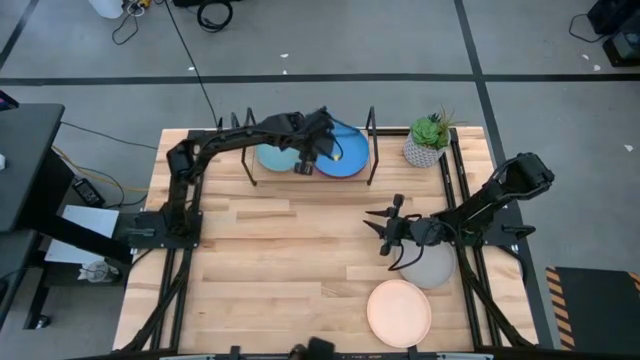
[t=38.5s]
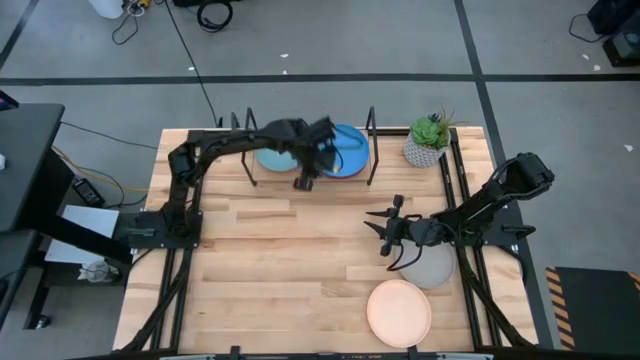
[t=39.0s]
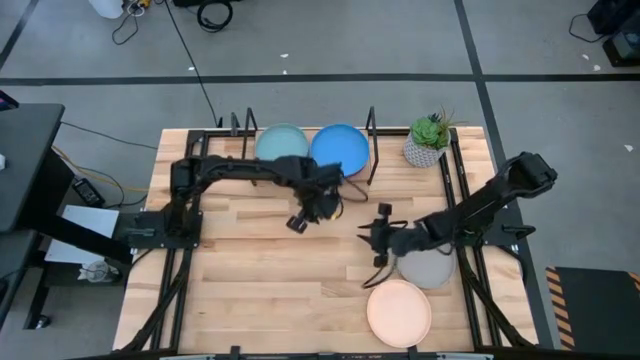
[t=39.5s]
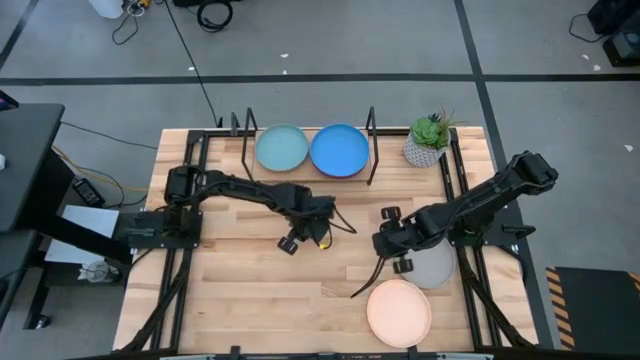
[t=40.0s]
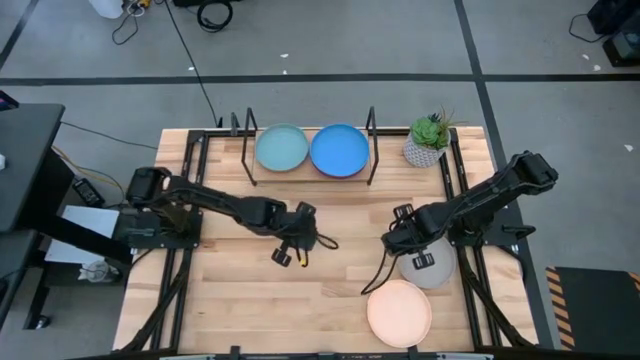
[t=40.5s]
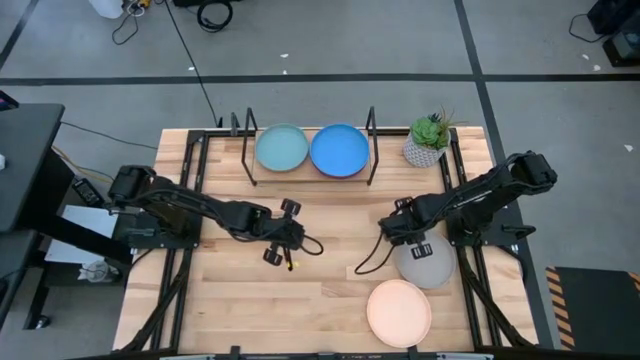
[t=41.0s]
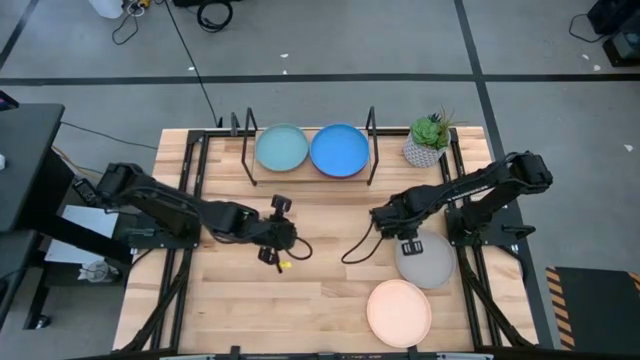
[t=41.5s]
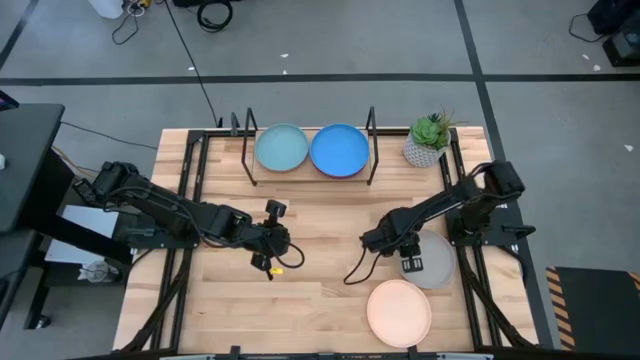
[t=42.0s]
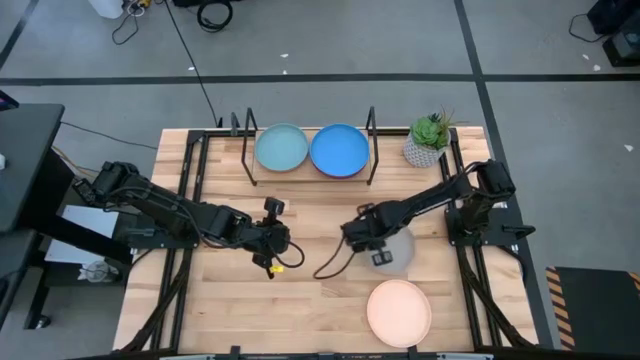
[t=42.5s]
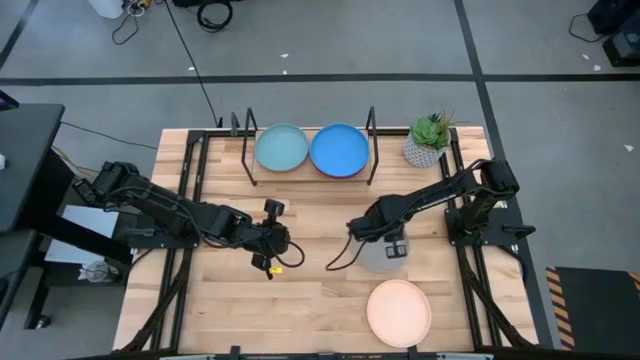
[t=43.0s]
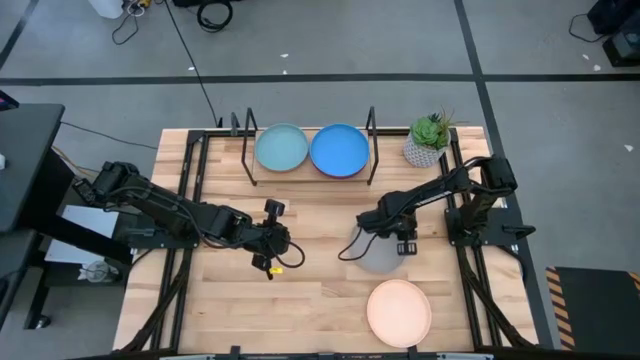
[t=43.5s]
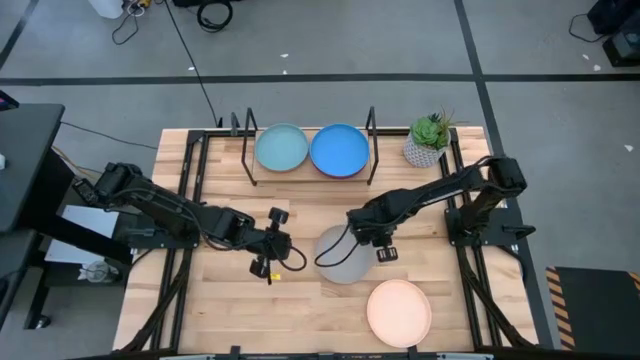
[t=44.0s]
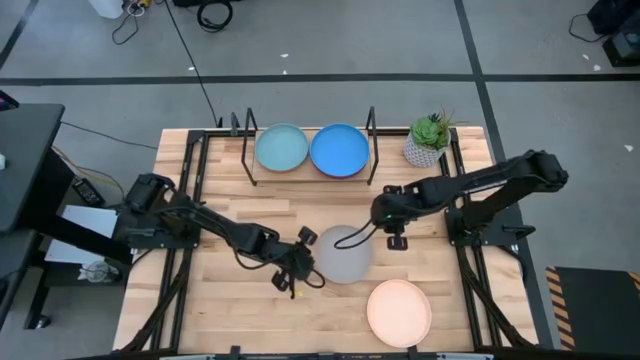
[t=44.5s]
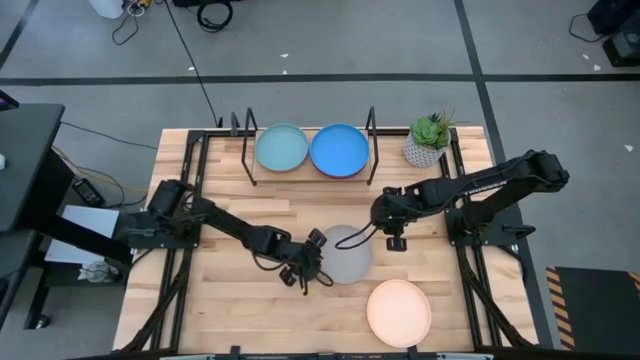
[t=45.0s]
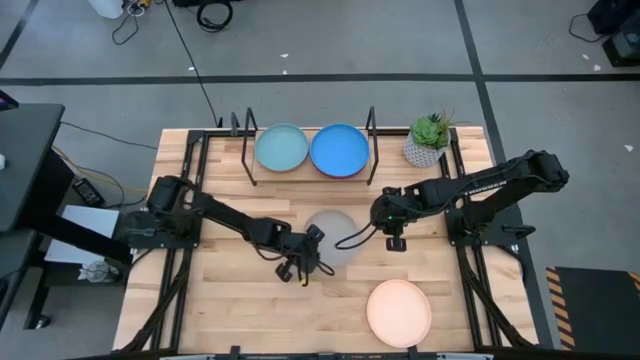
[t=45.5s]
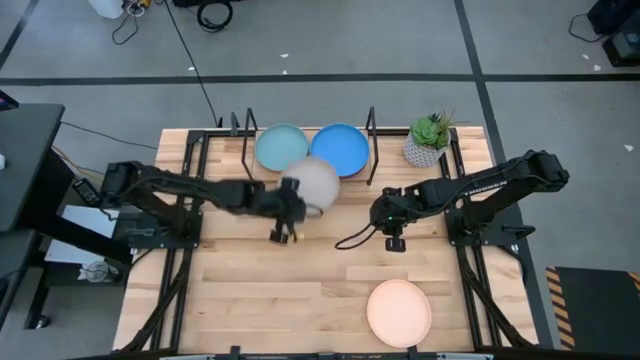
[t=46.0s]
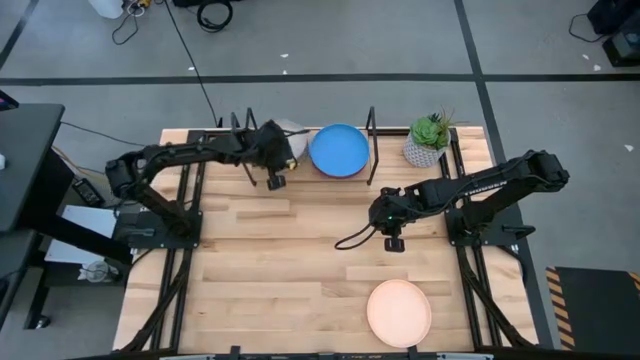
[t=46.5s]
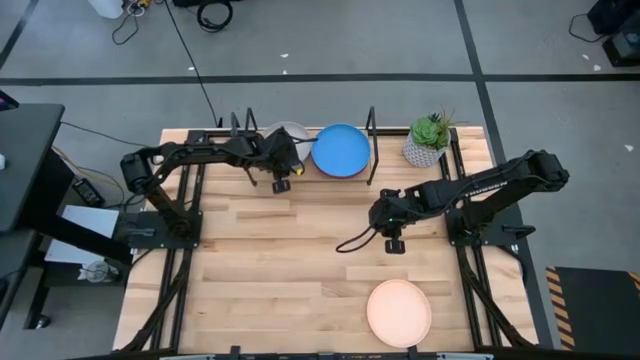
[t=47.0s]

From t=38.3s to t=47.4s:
Task: Place and stack plates onto a shelf
Stack the gray plate on top of the light blue plate on the shelf

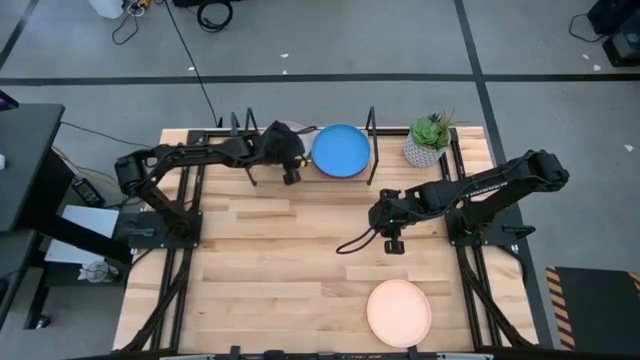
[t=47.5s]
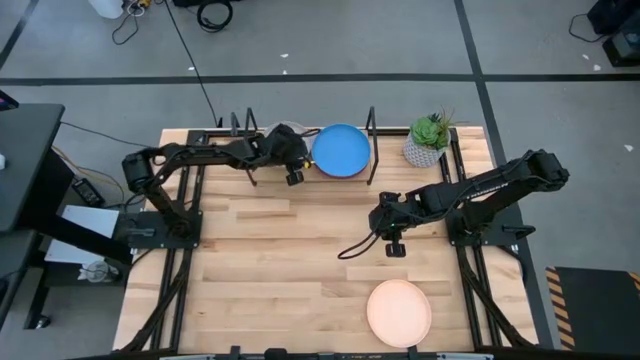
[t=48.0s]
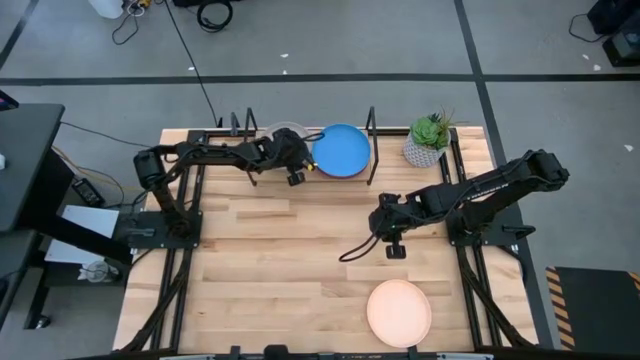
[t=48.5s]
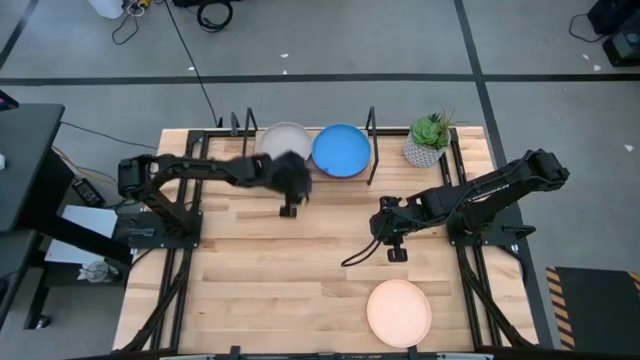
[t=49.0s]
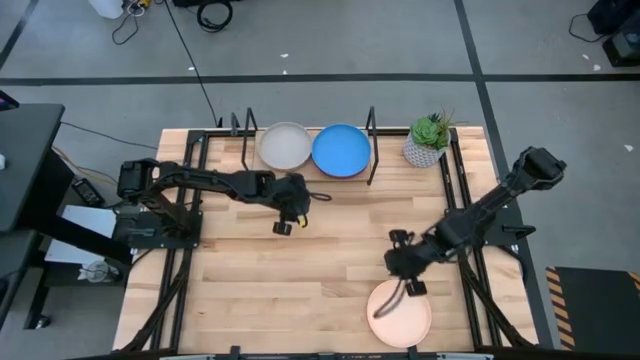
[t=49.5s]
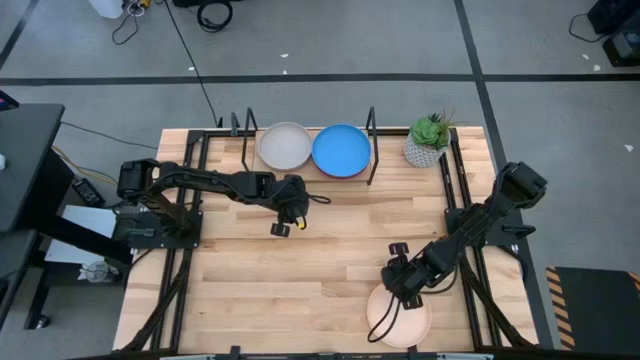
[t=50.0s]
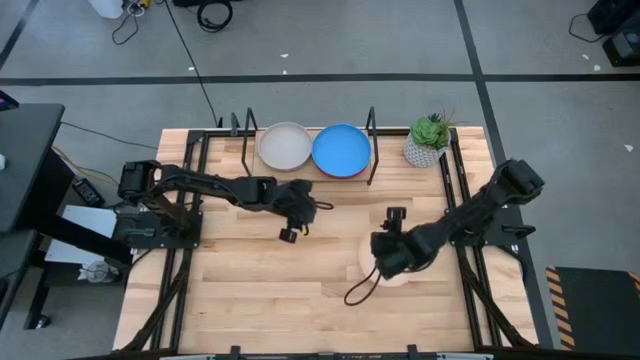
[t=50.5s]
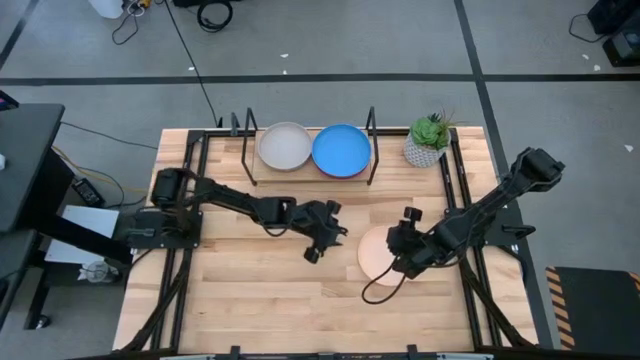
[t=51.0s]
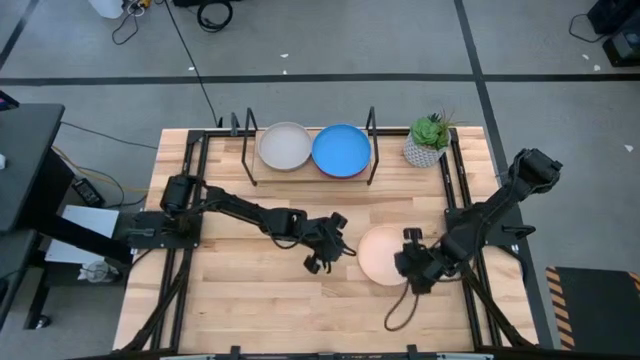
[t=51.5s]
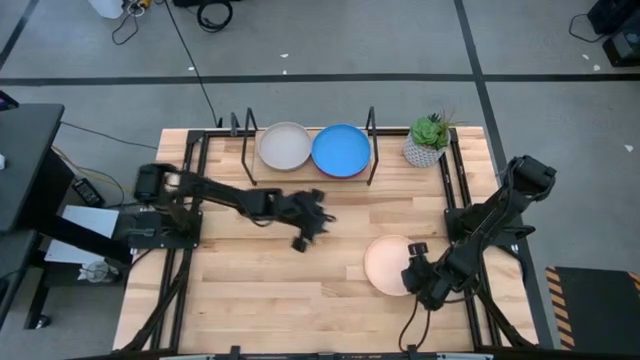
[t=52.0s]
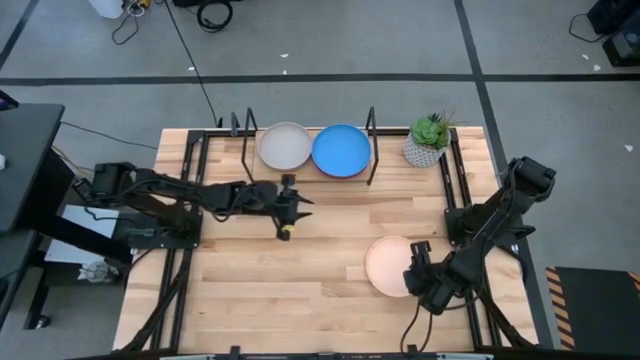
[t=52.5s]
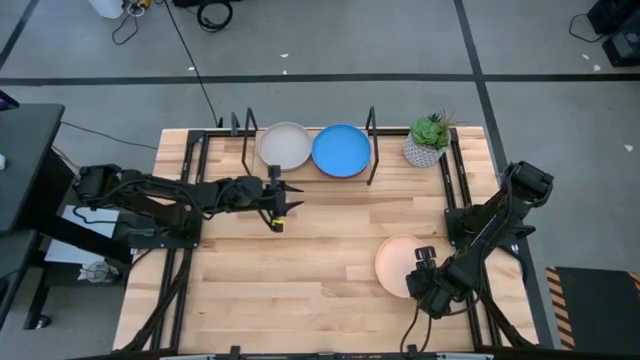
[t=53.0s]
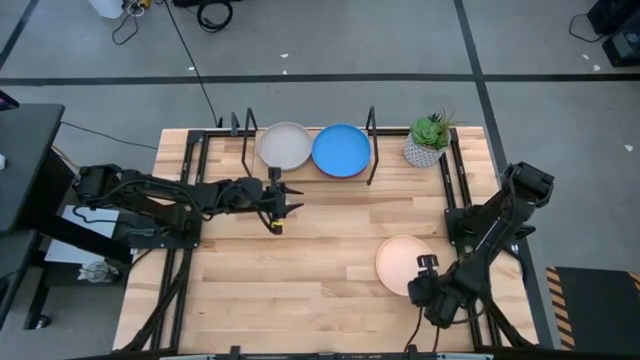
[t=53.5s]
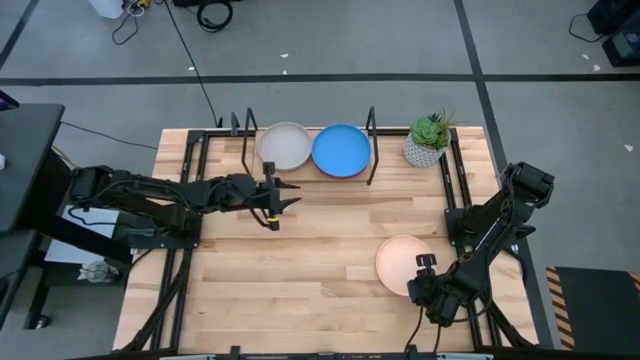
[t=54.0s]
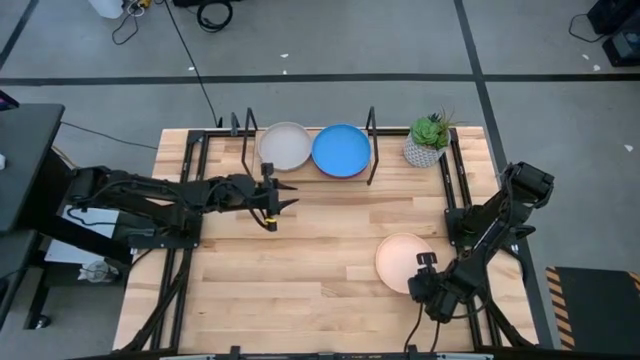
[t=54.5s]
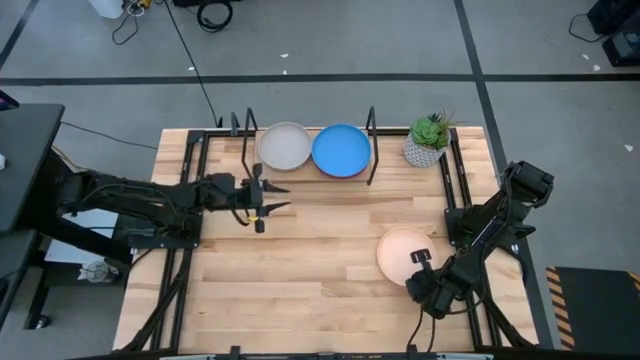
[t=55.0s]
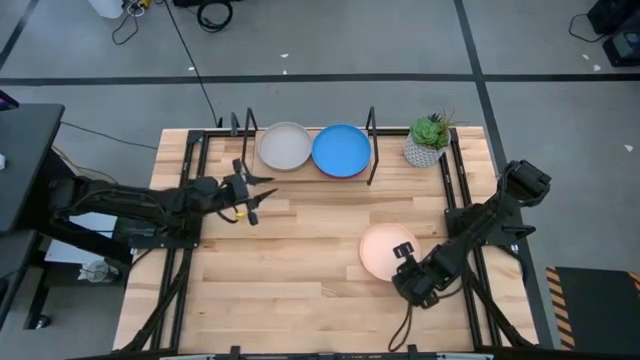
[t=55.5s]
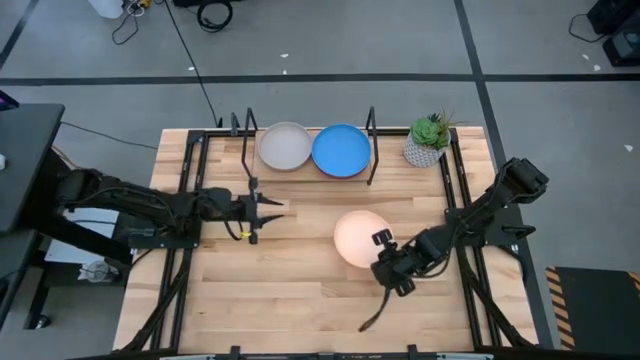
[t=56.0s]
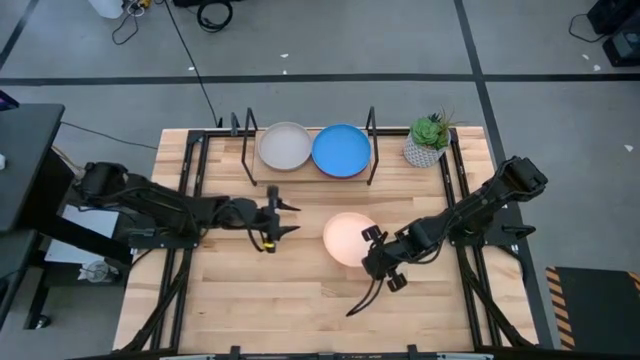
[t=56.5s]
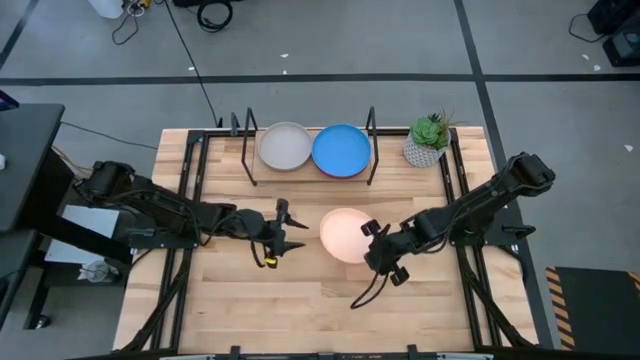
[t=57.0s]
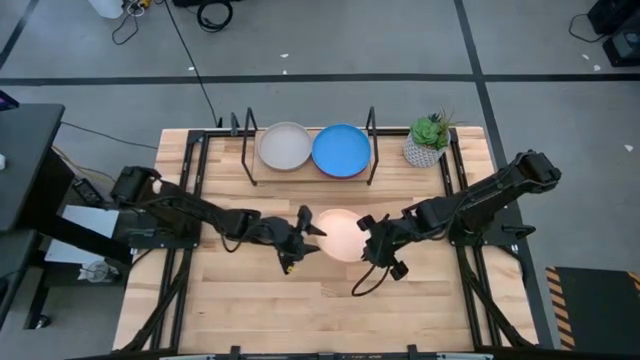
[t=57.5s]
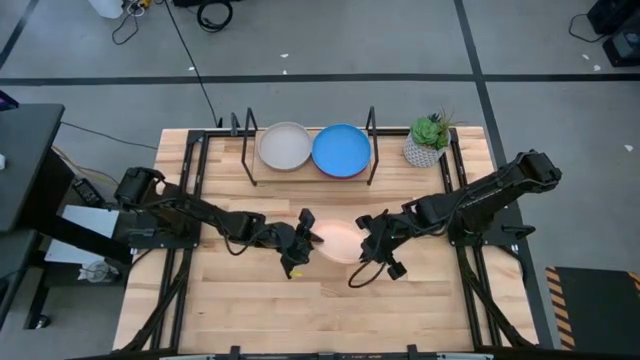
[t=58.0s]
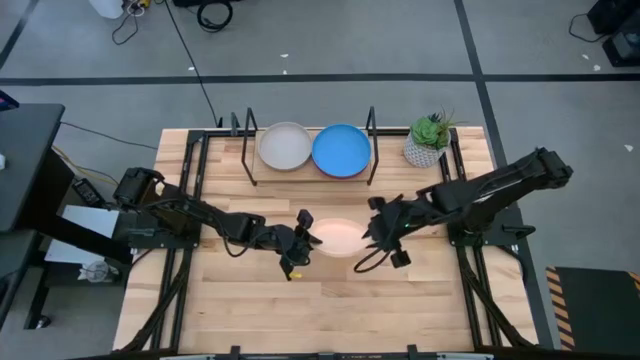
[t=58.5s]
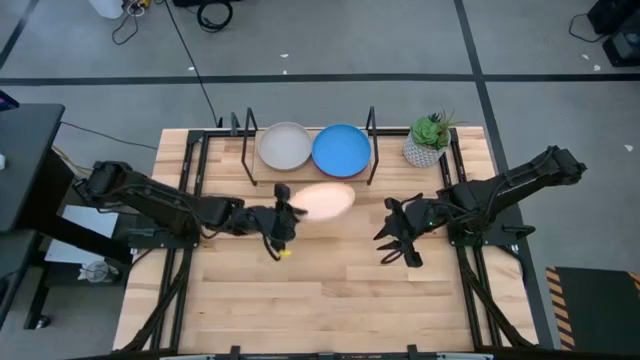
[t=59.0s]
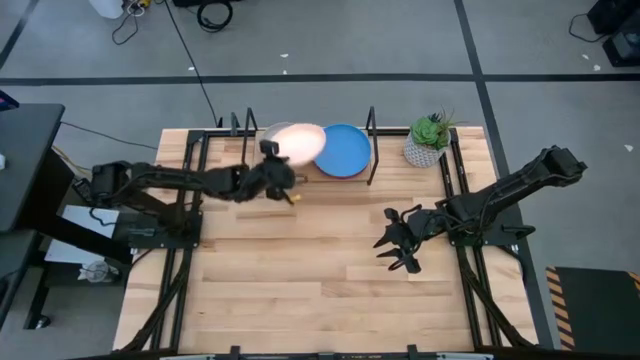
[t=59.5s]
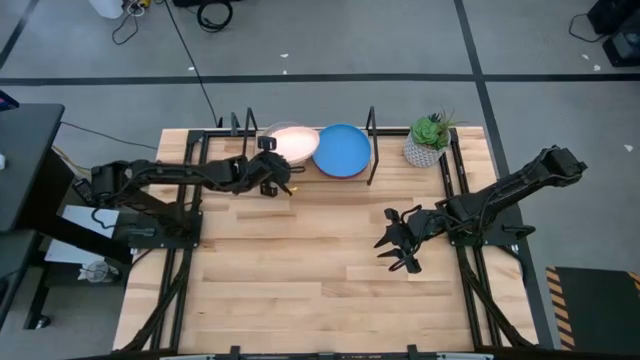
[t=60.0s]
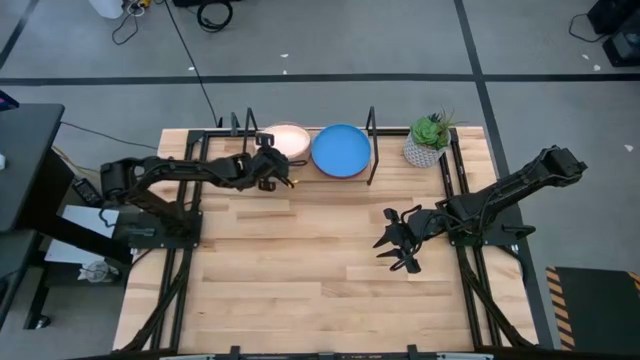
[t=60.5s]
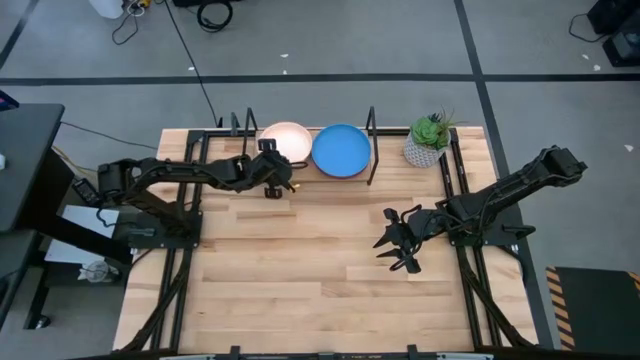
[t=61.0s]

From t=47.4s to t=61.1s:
Stack the light orange on top of the gray plate on the shelf
